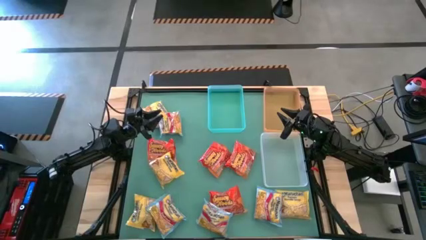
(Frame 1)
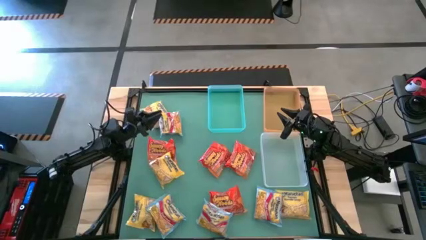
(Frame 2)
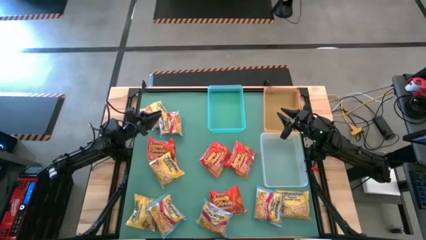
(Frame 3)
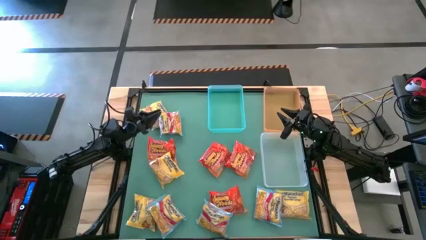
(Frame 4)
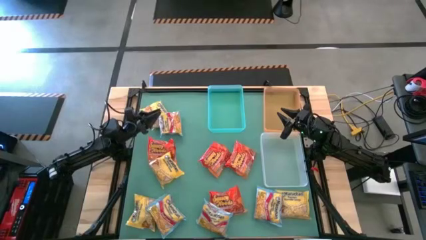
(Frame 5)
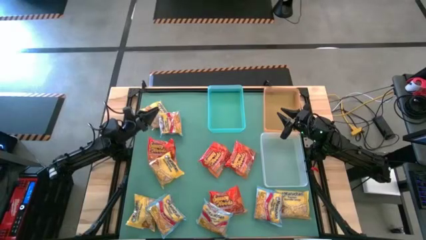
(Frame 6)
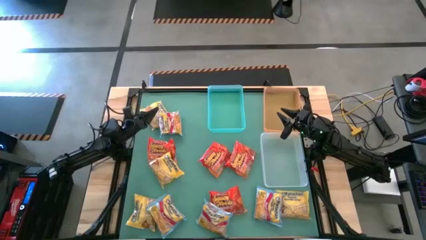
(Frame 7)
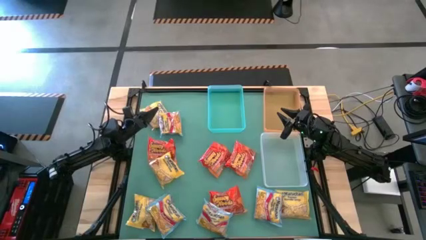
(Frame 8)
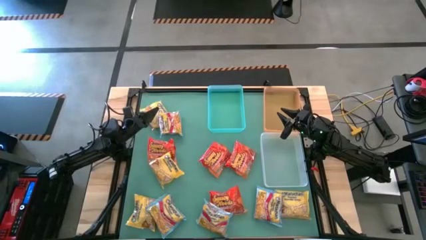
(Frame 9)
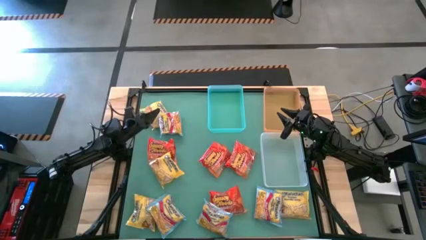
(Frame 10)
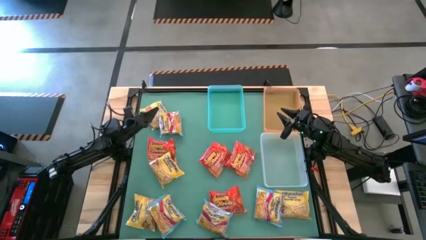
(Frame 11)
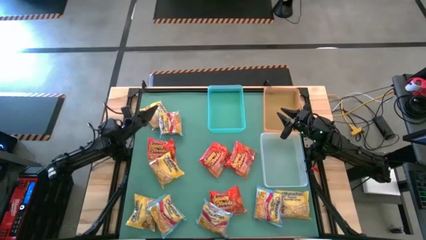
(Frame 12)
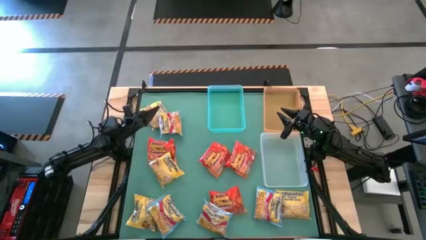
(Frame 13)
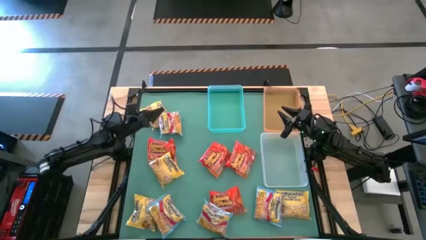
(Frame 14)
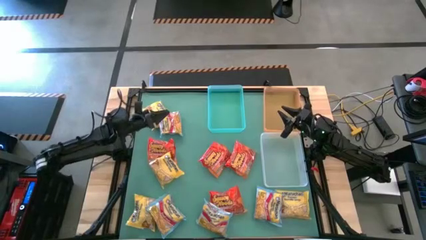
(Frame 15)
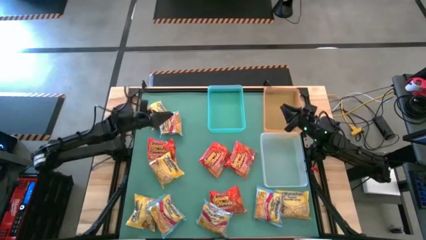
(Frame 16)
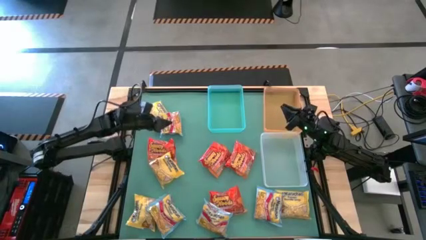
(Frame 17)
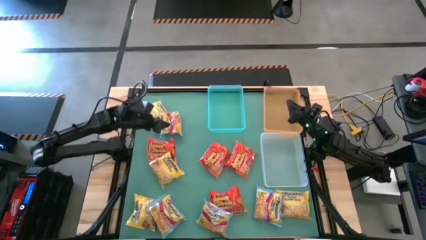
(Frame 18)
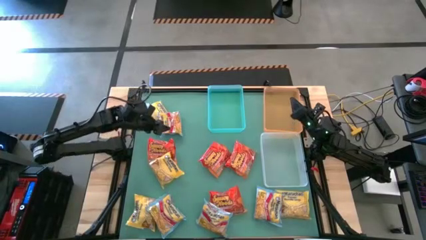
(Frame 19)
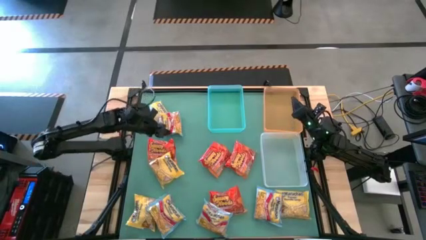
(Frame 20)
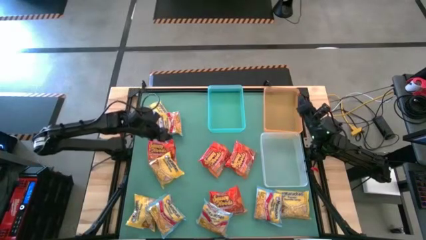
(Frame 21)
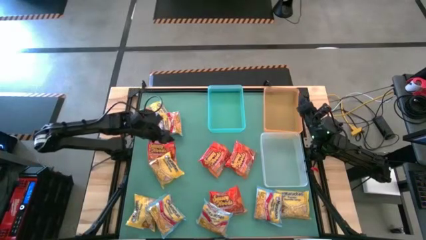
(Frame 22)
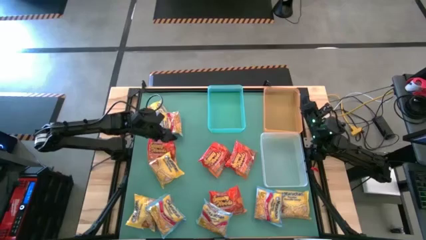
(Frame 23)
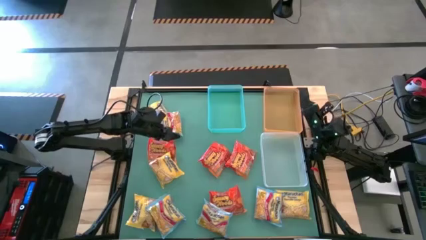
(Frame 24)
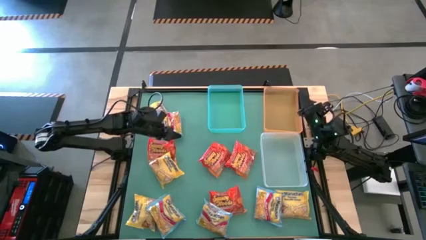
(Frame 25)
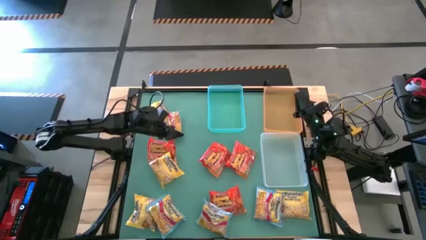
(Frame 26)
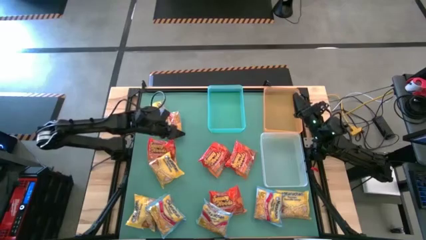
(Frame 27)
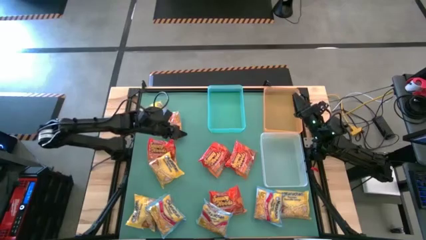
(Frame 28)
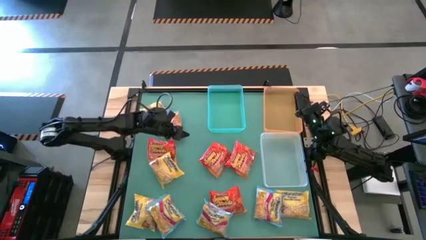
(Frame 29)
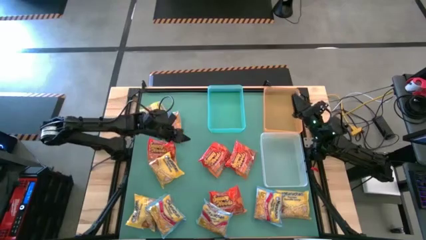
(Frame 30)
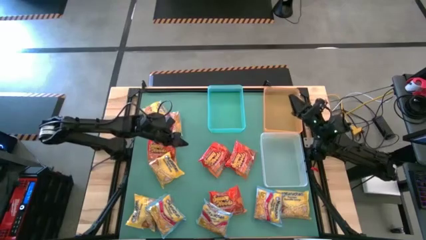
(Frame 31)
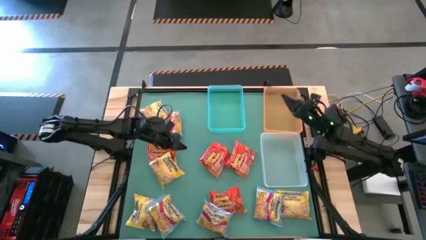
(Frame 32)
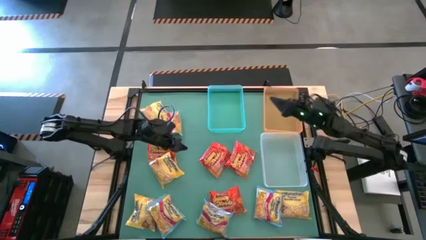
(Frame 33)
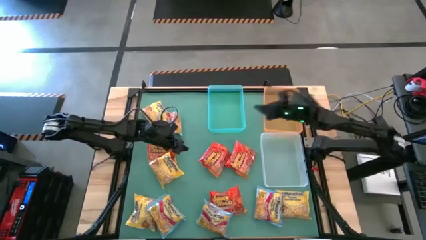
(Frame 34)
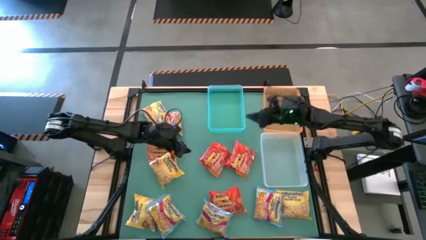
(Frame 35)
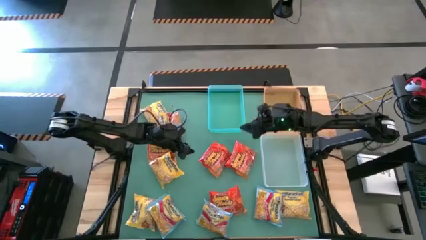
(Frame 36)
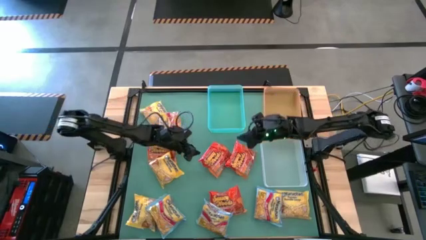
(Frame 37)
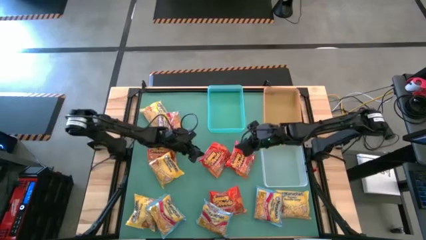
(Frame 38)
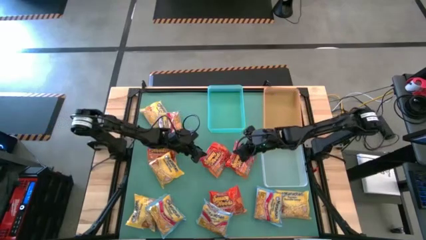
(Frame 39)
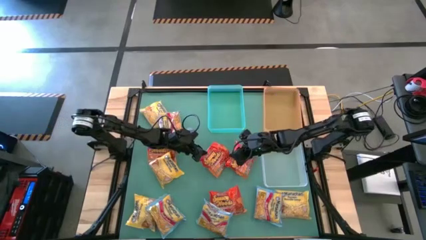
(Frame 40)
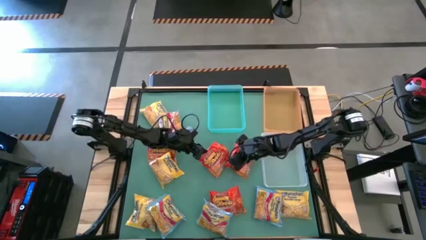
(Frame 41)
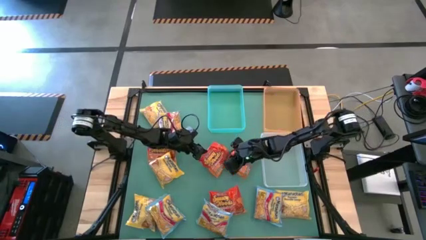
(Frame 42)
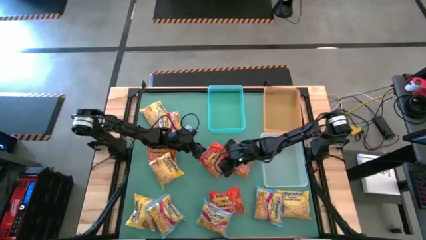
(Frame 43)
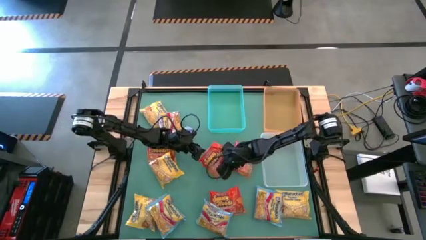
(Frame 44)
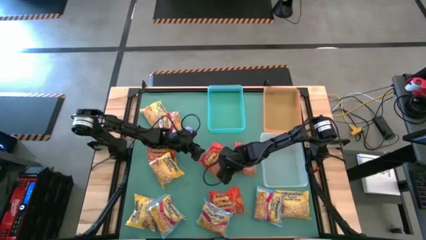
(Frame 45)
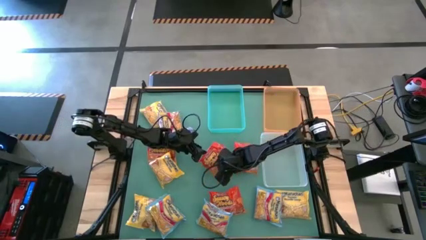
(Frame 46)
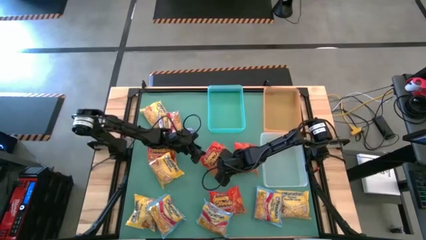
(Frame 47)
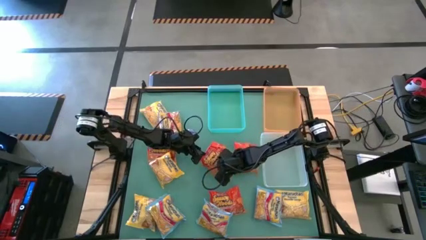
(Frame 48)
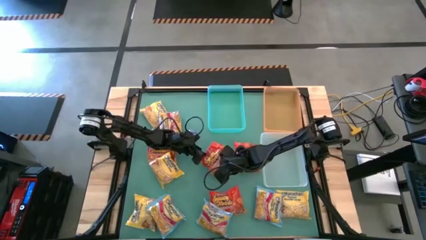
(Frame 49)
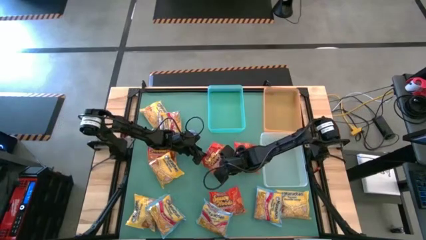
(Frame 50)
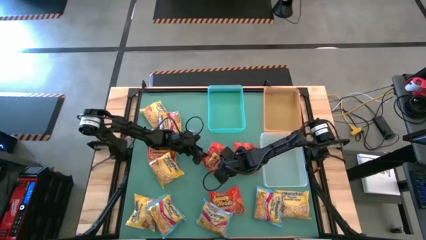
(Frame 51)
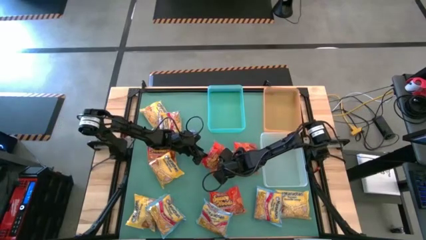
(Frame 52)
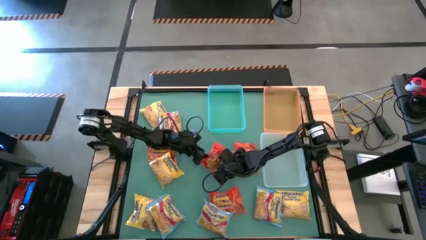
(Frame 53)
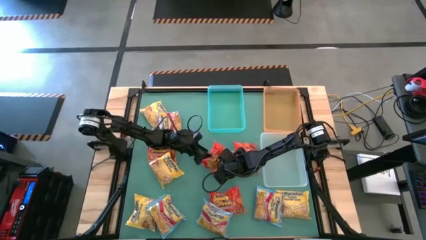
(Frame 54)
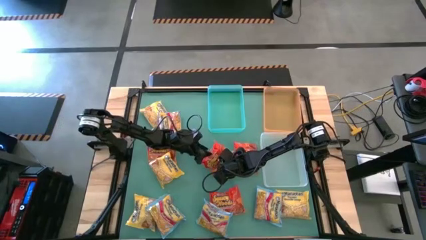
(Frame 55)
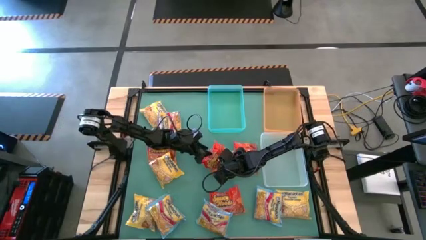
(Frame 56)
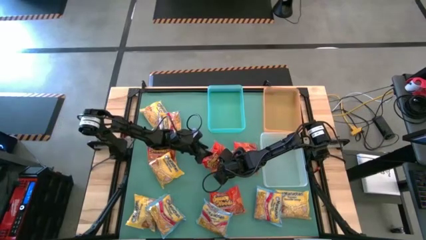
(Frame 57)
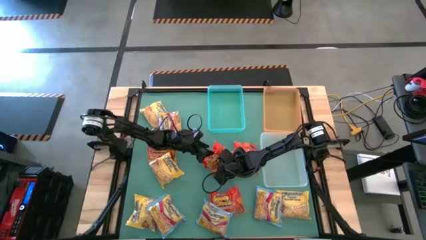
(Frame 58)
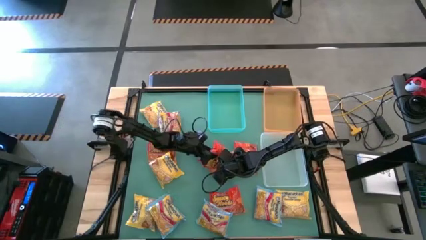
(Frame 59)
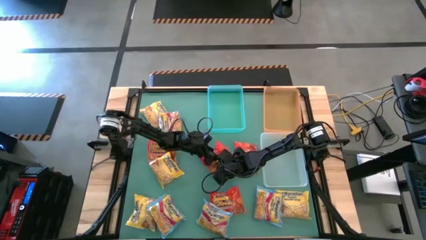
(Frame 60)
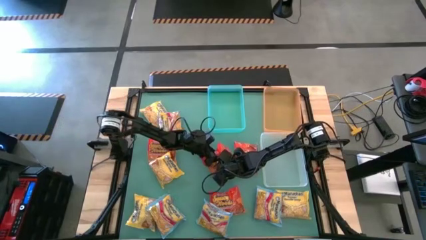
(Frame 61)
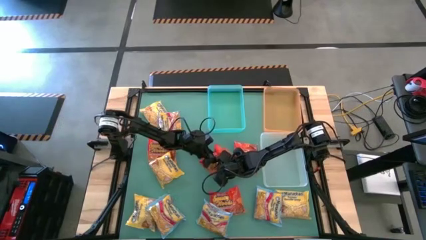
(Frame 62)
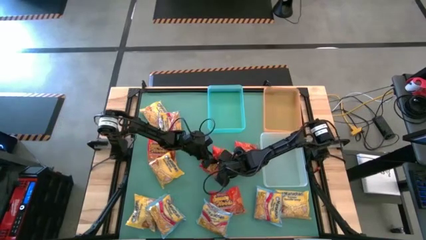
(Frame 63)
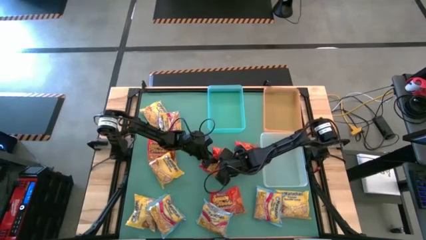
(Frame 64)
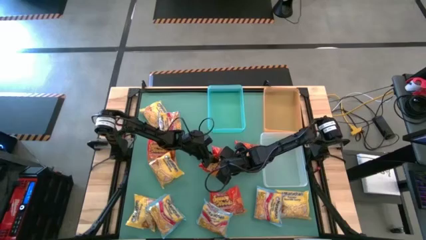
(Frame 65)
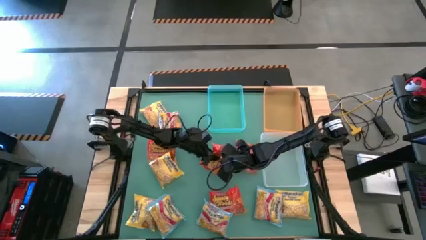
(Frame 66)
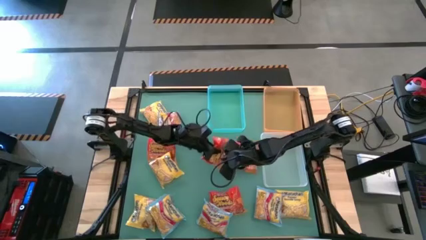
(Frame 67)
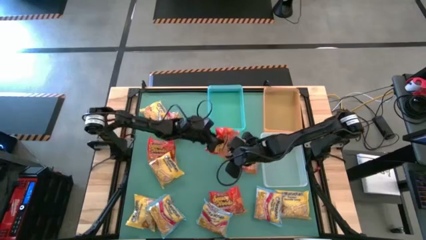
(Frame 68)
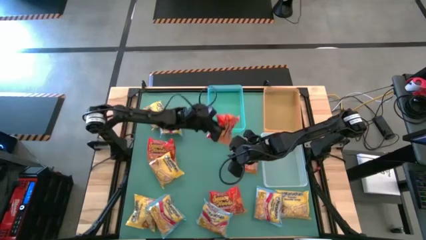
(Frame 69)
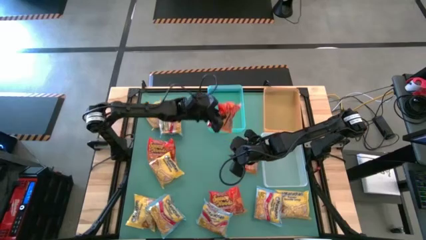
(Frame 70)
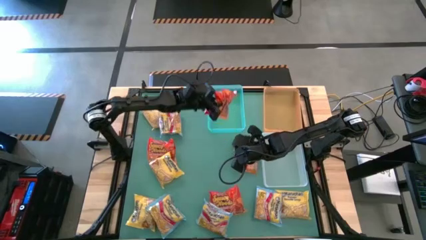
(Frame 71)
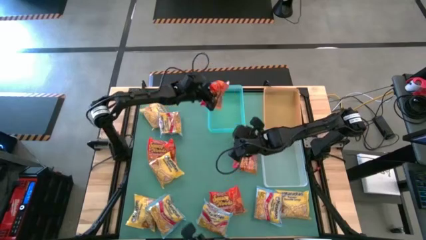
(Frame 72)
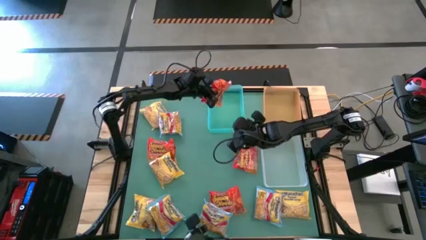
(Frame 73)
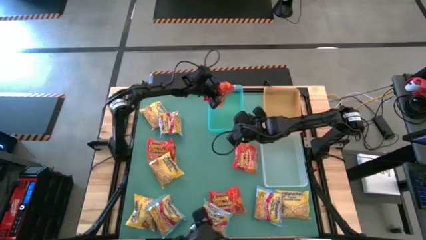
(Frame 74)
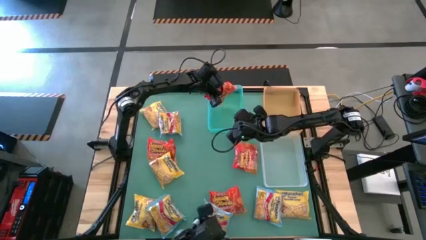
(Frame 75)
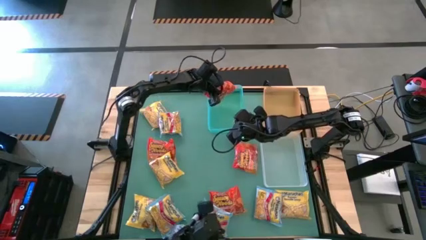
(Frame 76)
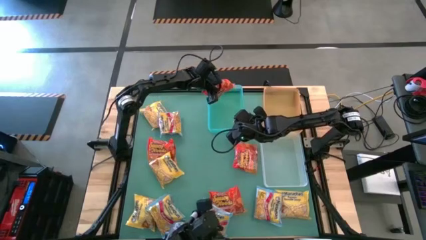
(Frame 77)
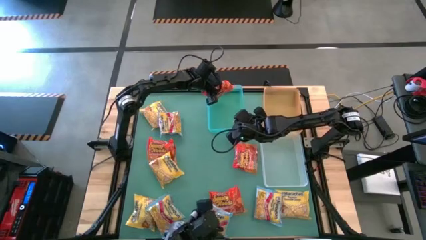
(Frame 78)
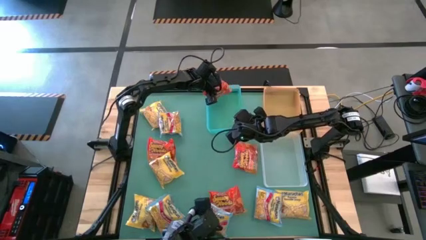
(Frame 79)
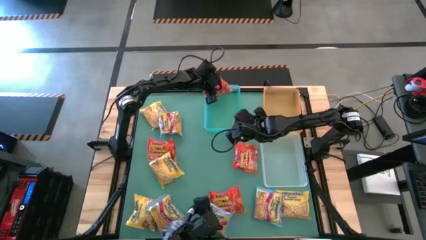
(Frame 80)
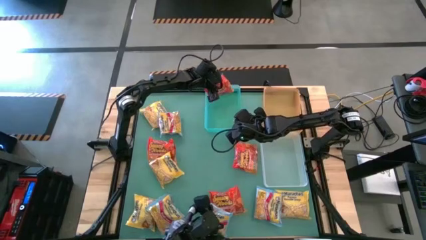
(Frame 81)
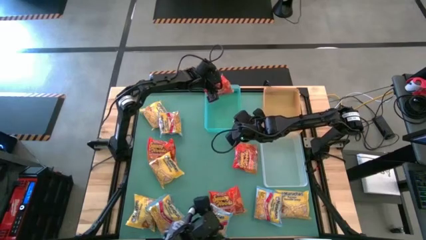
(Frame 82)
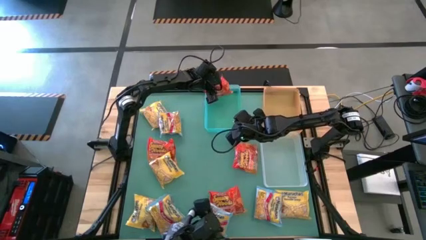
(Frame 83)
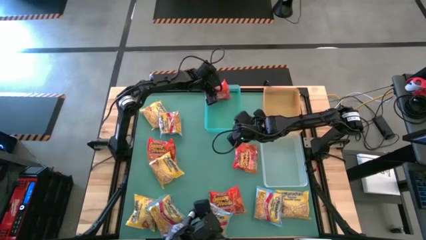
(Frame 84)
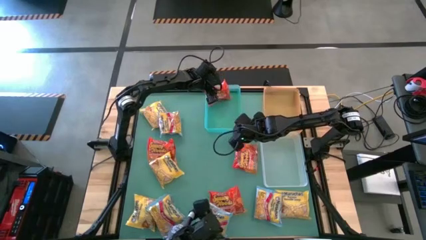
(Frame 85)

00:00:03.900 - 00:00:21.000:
Task: Sort Maruchan noodles
Put the orange noodle pack into the green bin
